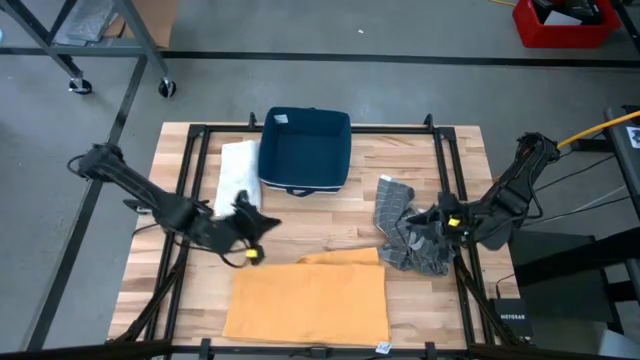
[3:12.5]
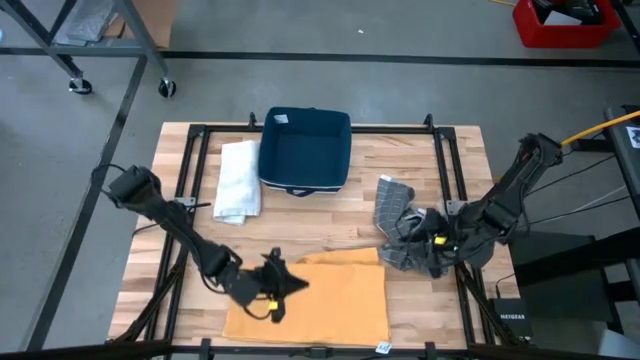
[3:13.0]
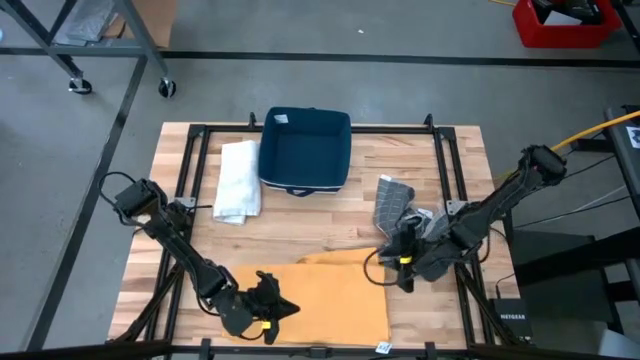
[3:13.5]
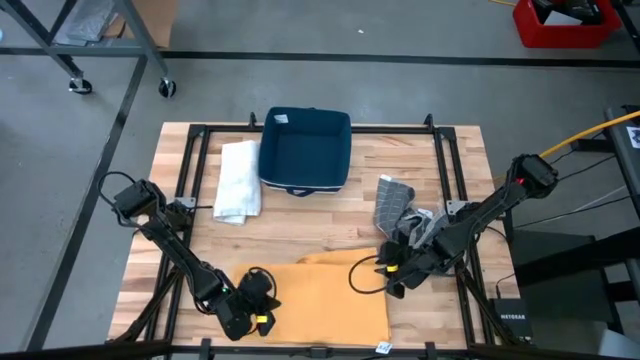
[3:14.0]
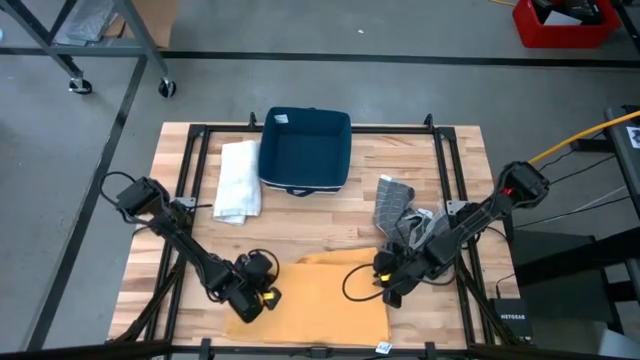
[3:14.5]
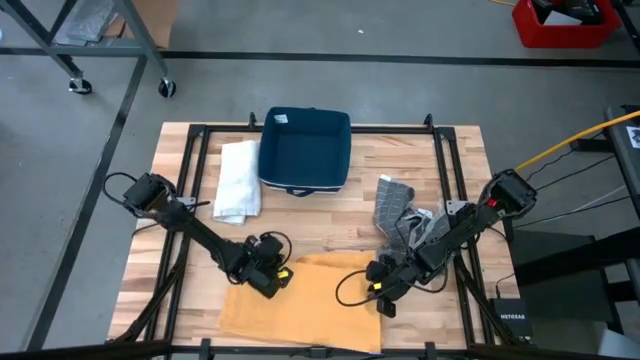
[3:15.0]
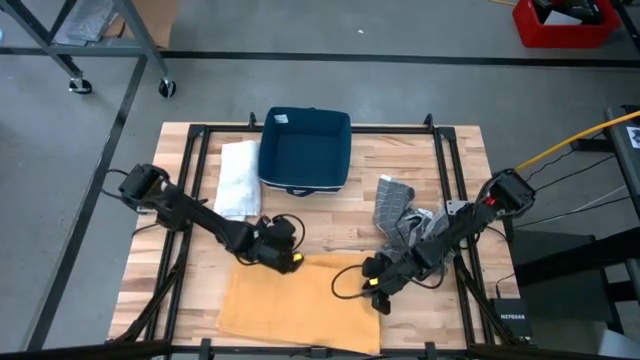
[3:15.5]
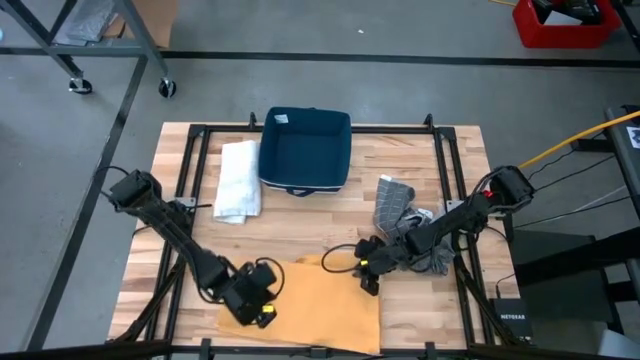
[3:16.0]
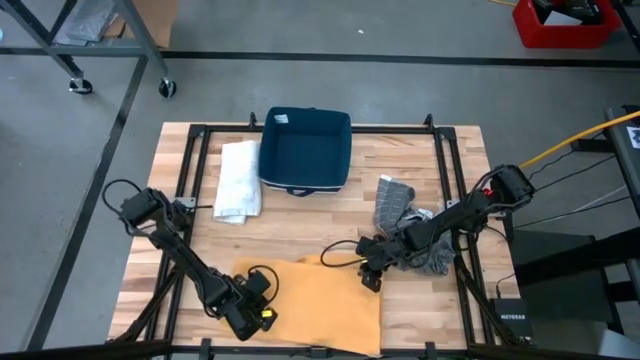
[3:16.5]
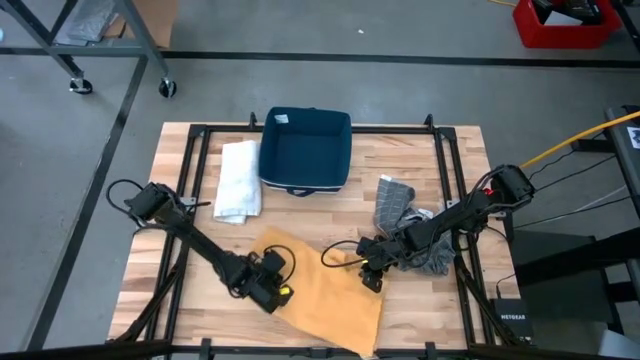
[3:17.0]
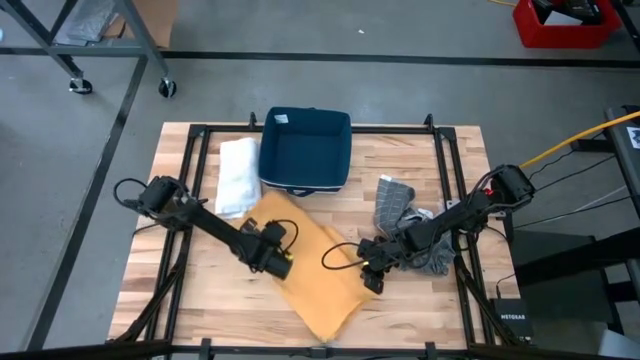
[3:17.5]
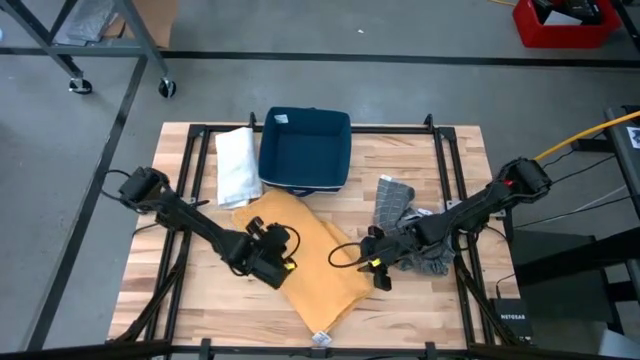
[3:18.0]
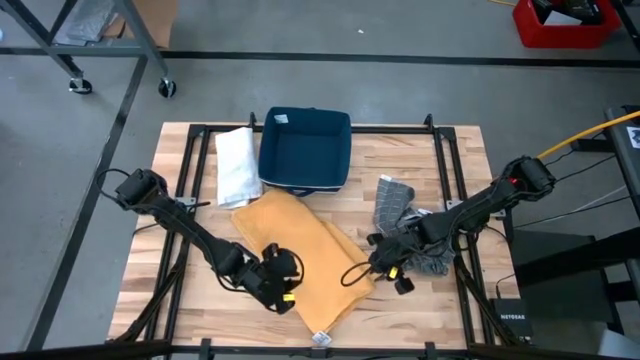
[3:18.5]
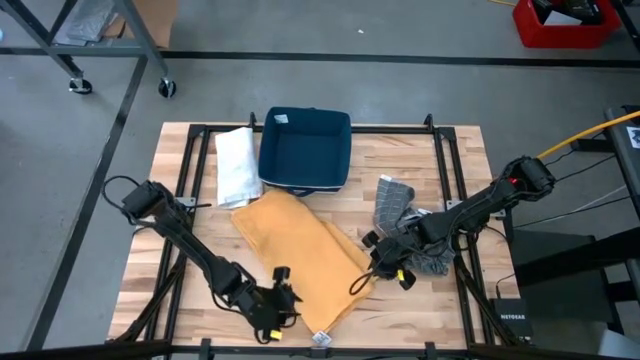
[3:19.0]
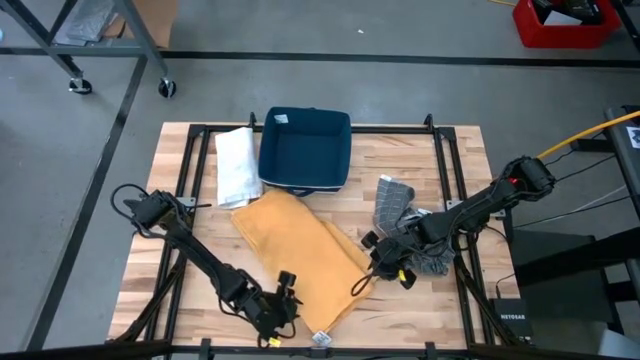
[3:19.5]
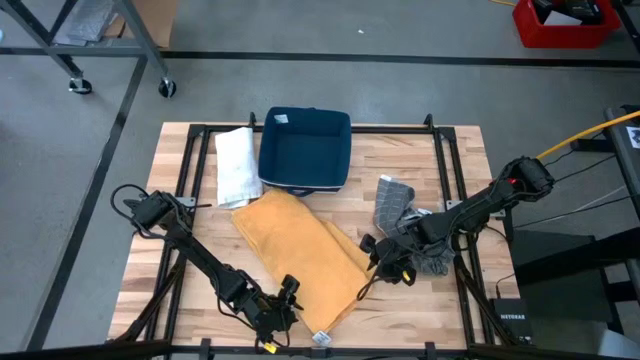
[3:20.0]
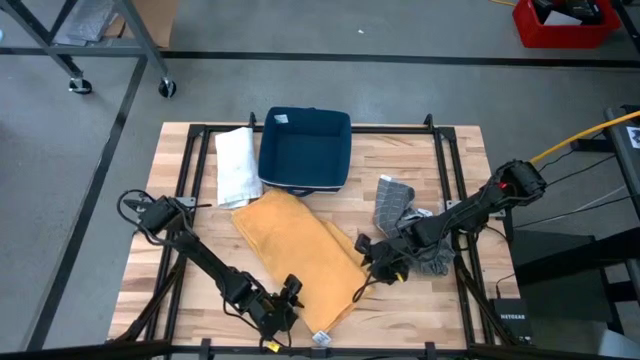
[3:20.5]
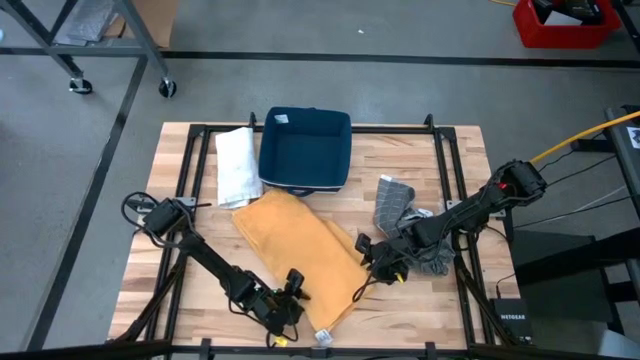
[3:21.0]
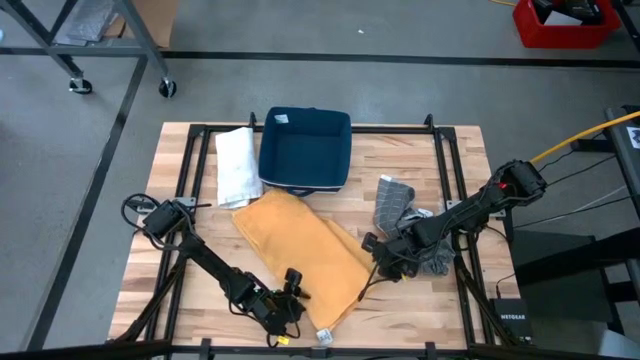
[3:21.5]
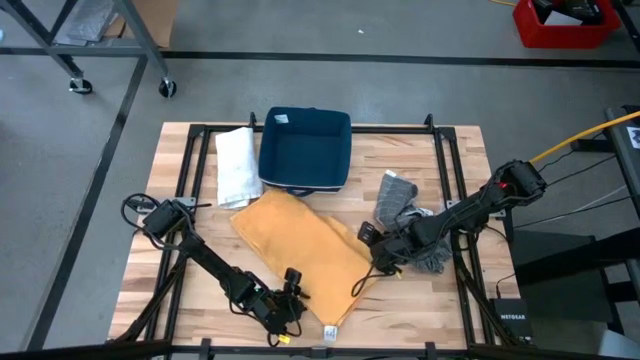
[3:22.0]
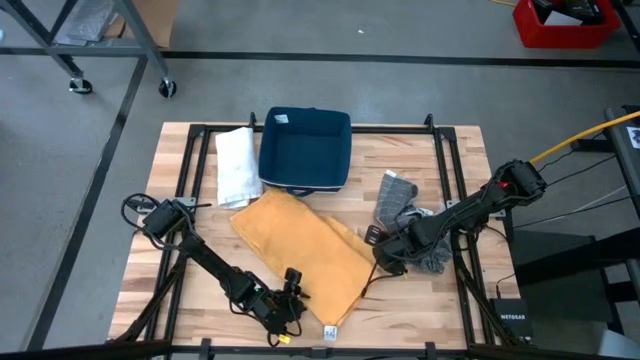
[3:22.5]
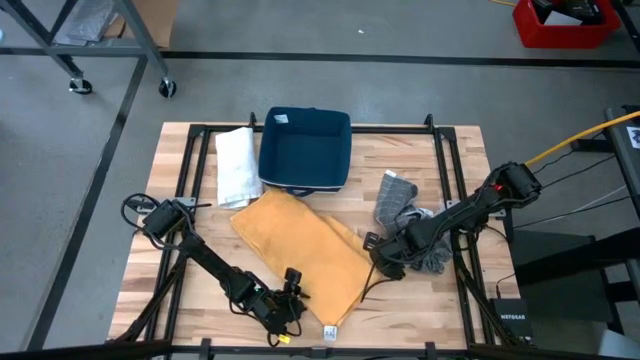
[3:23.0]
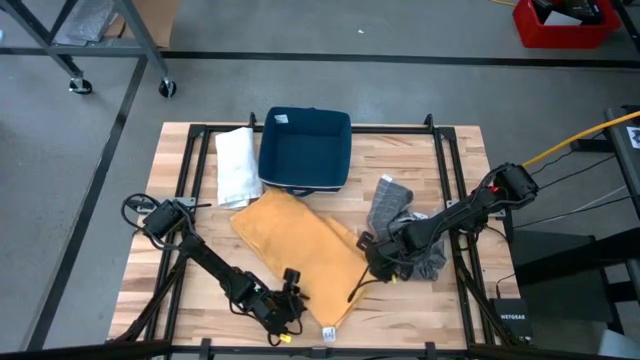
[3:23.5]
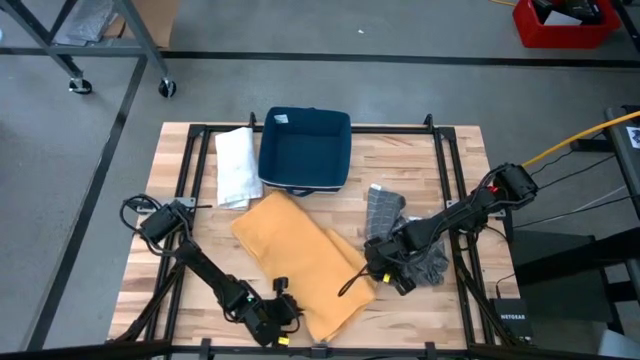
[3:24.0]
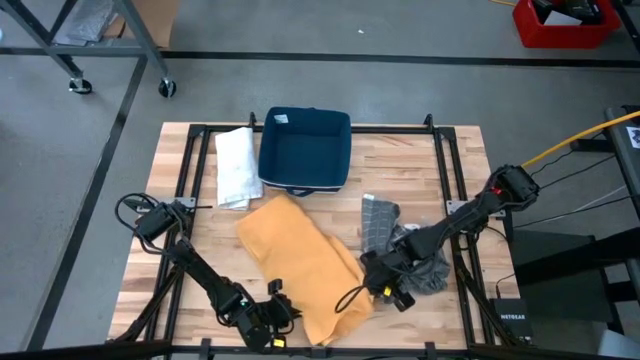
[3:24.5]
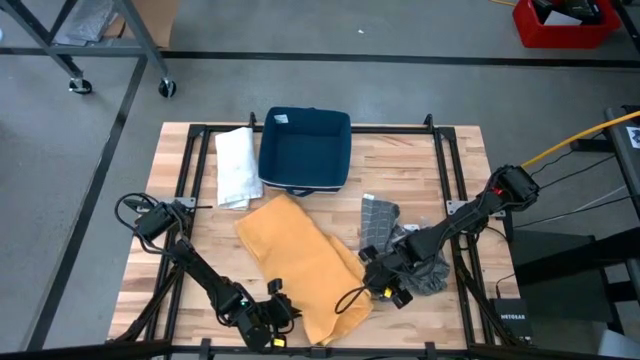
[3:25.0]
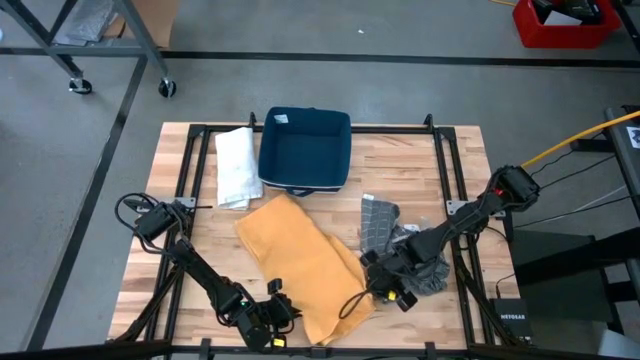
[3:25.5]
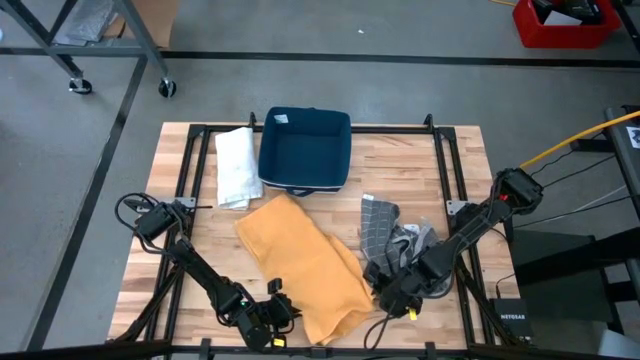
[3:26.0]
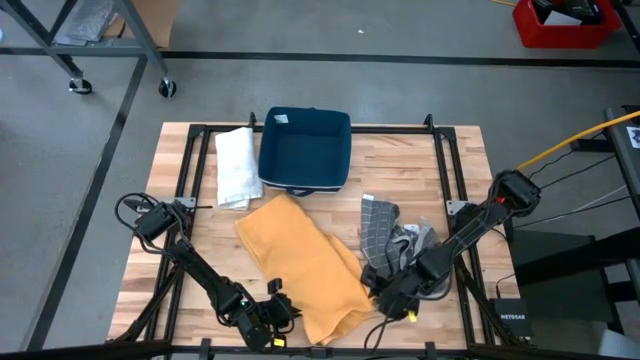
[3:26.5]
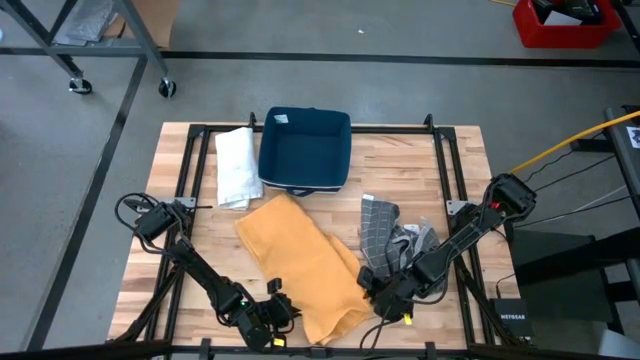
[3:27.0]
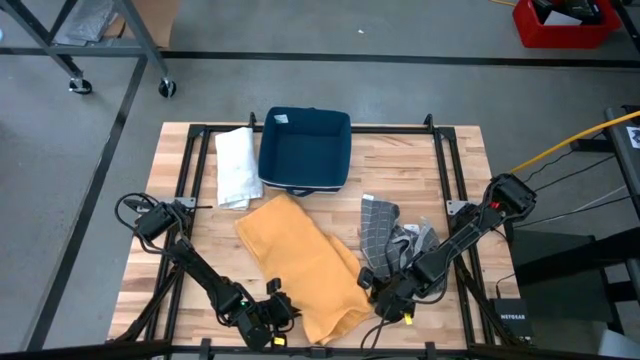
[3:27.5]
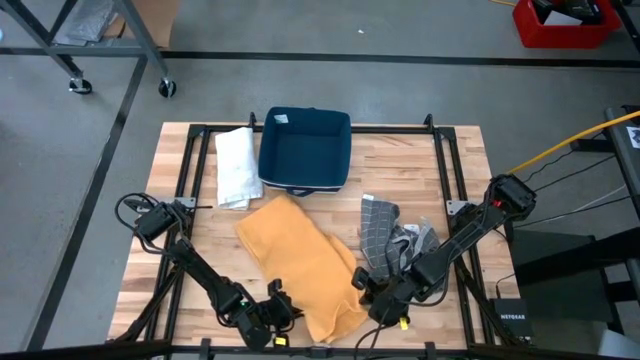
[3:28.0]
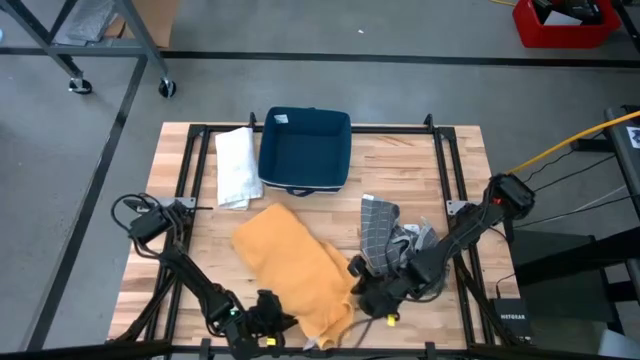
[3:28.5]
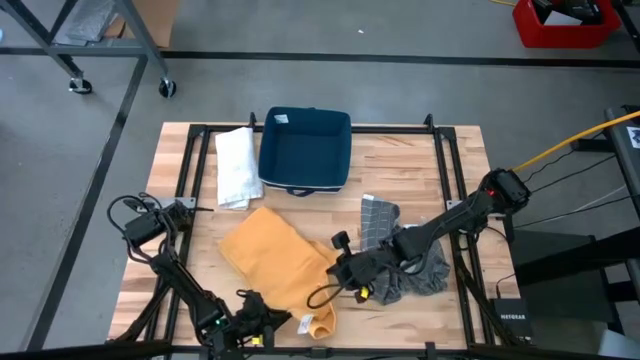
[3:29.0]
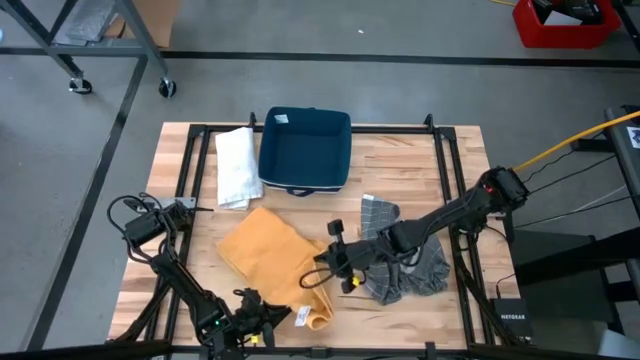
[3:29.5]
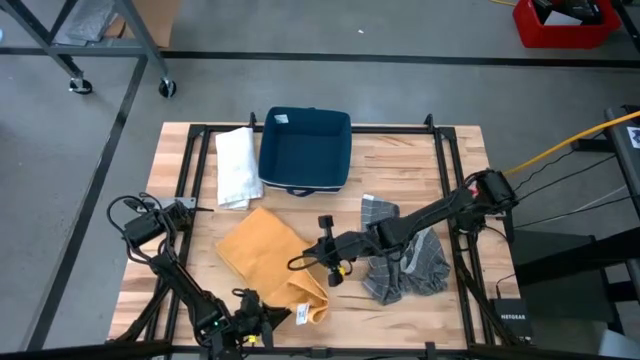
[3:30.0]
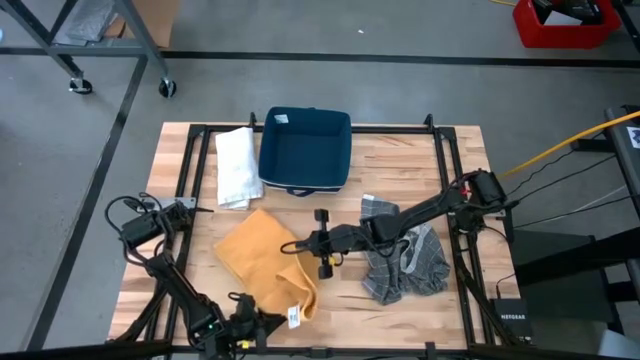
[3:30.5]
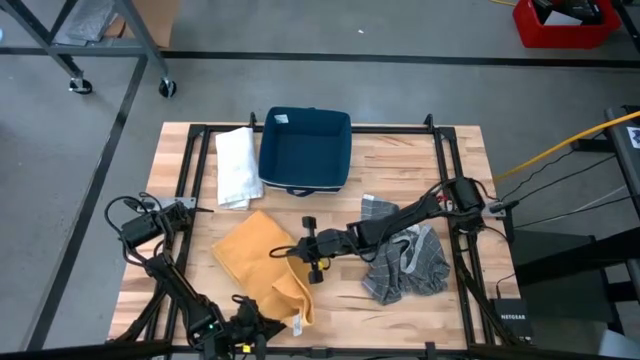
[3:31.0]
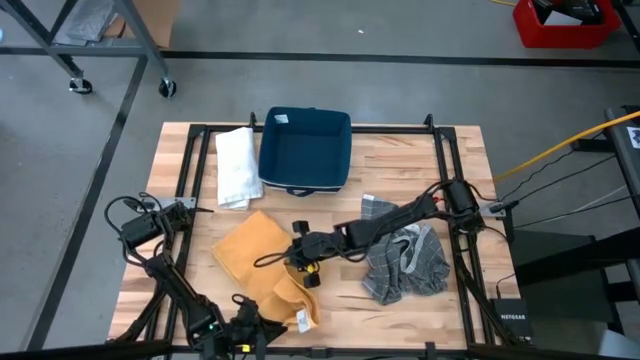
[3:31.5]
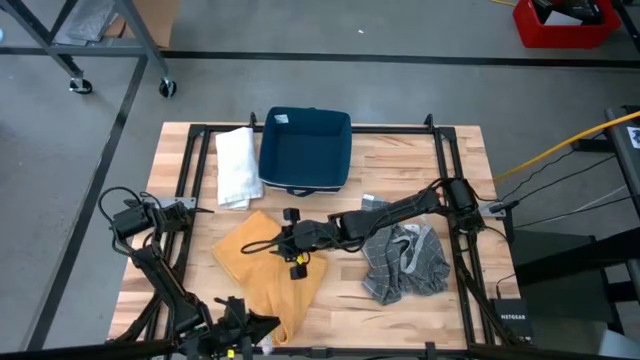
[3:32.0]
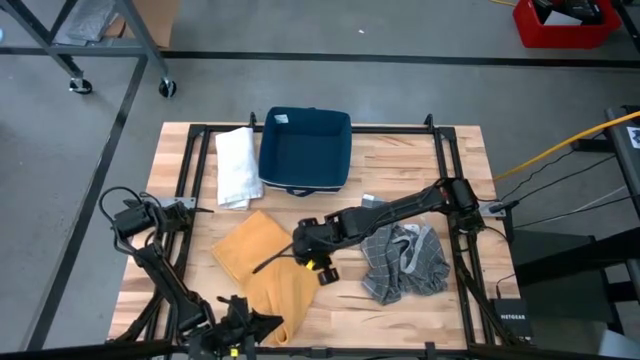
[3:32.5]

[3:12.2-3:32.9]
Task: Fold towel
Fold the yellow towel
